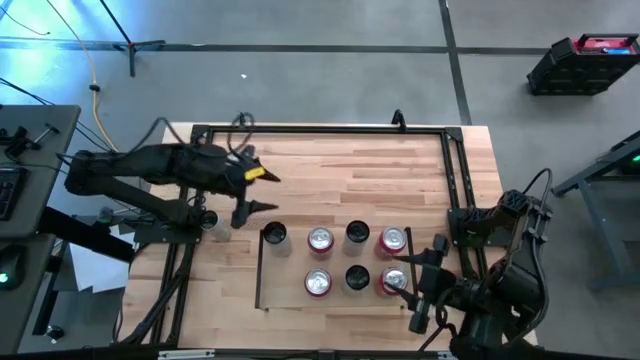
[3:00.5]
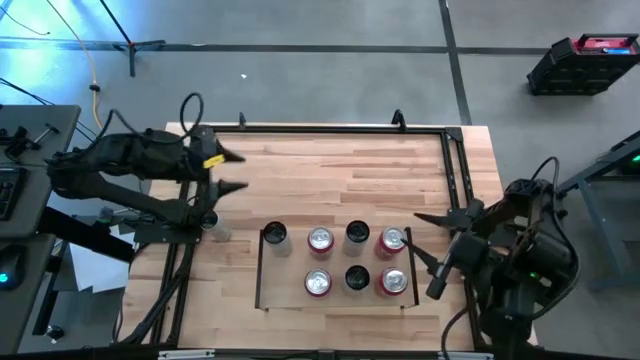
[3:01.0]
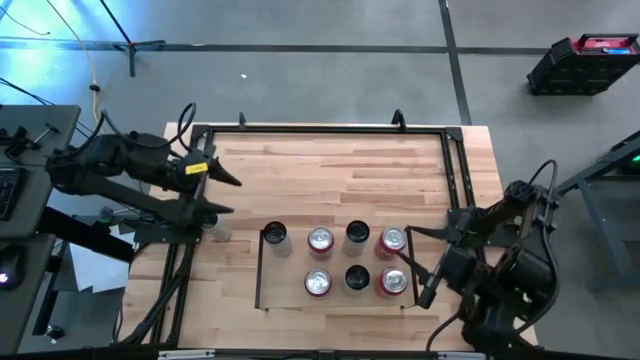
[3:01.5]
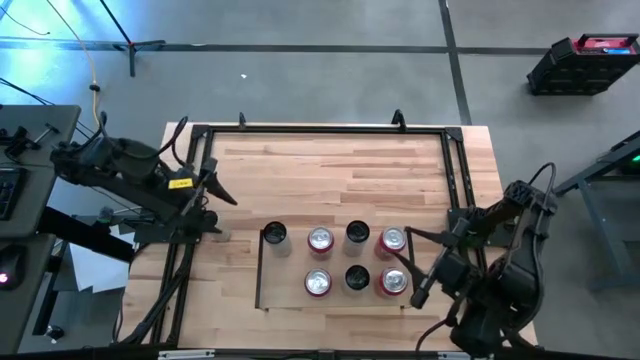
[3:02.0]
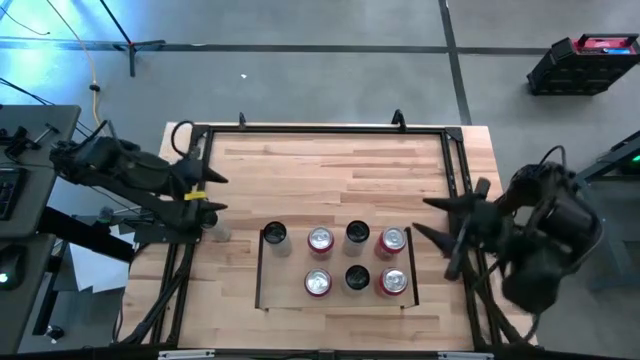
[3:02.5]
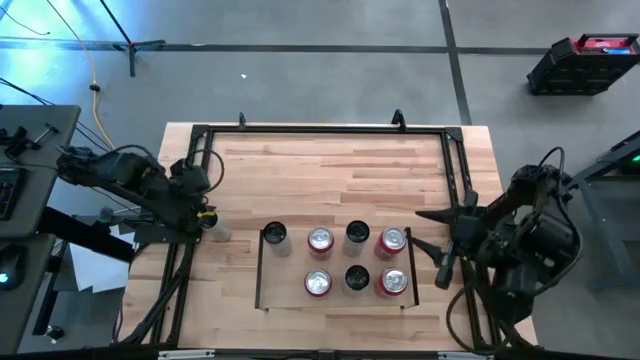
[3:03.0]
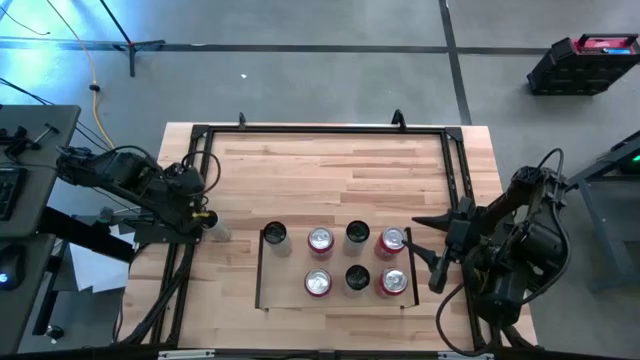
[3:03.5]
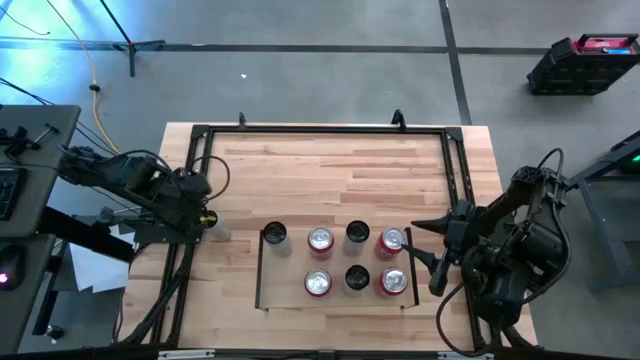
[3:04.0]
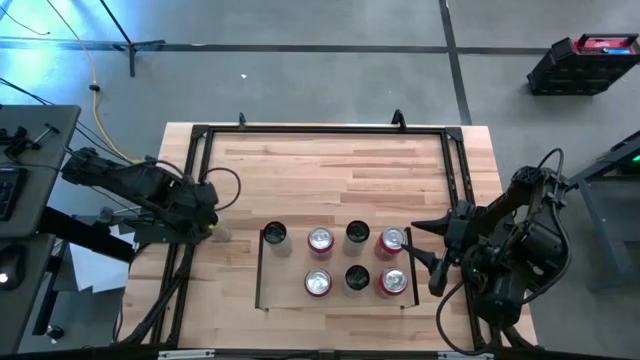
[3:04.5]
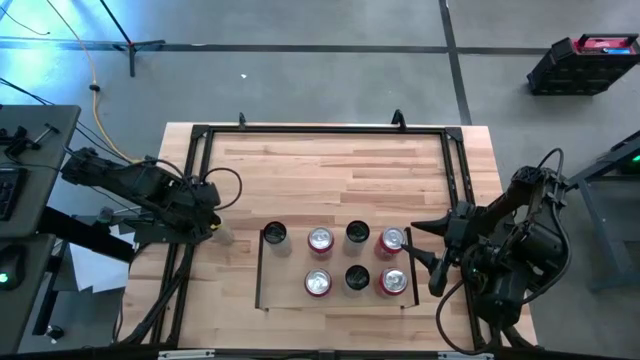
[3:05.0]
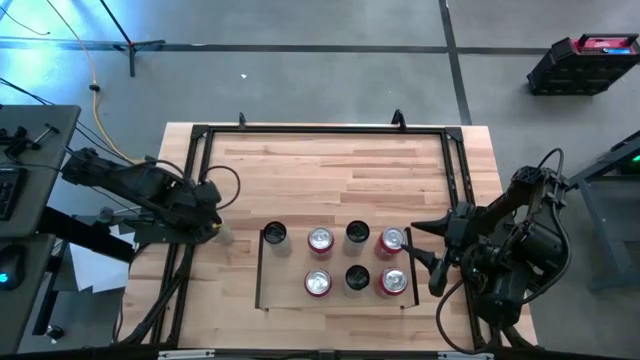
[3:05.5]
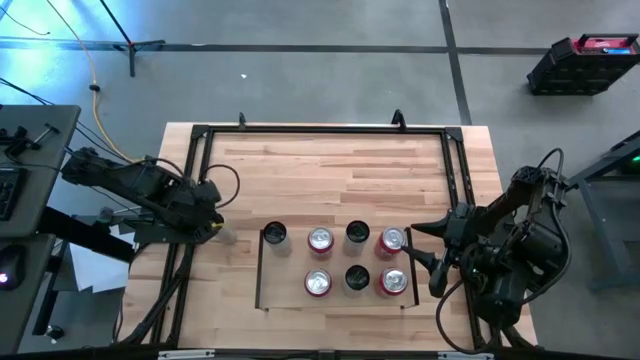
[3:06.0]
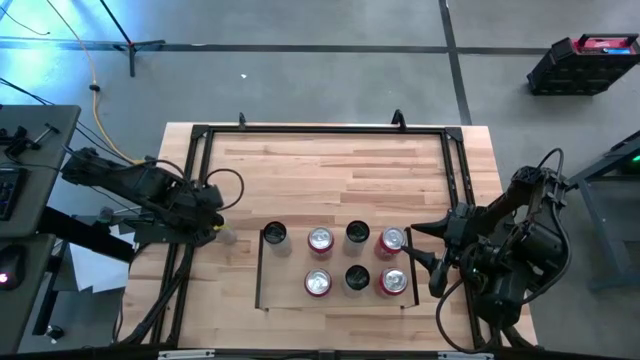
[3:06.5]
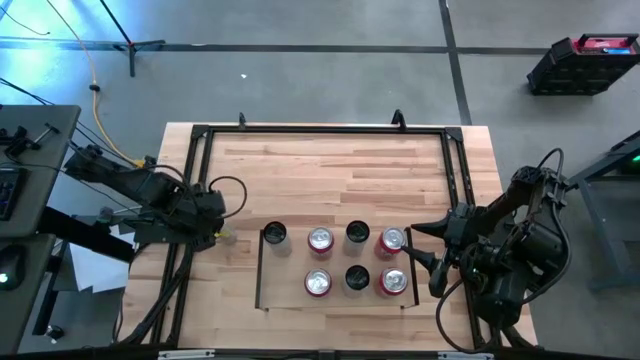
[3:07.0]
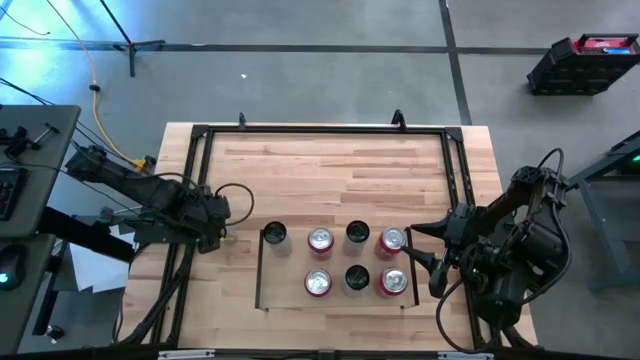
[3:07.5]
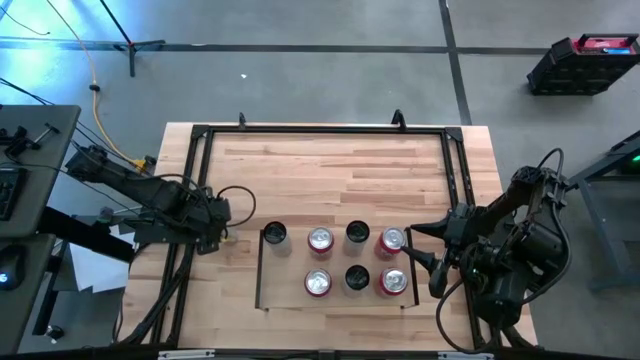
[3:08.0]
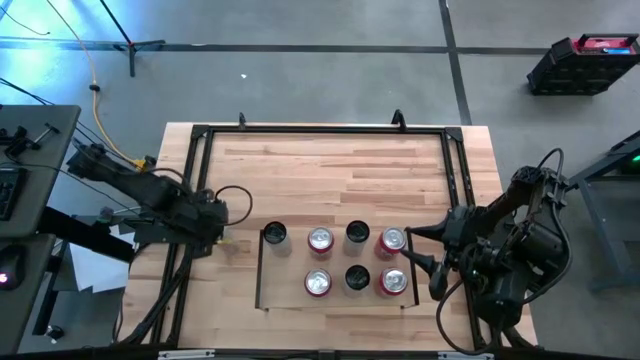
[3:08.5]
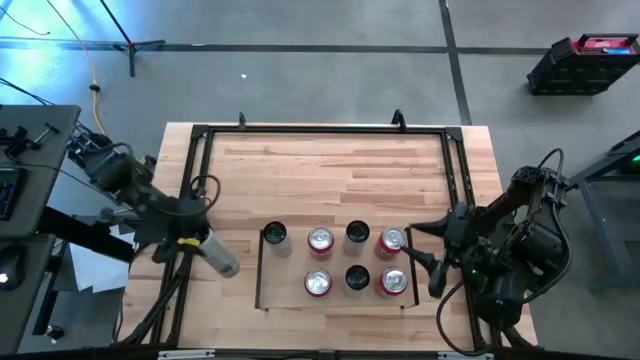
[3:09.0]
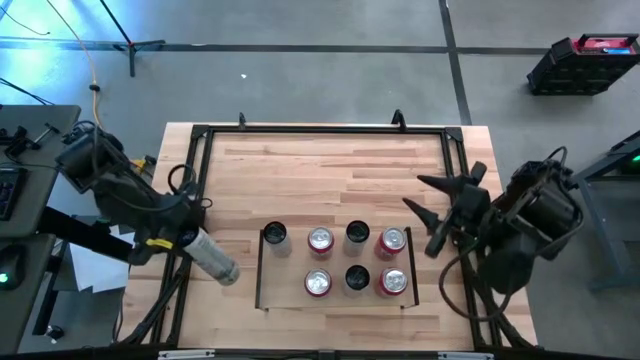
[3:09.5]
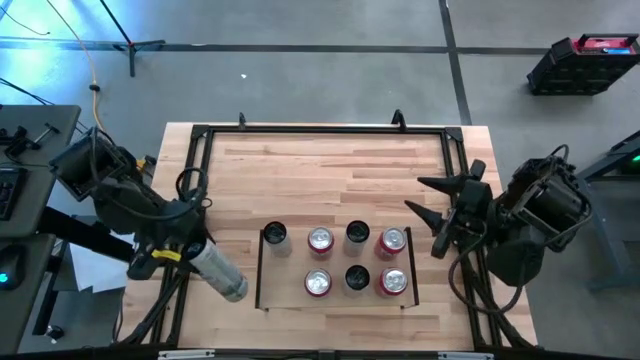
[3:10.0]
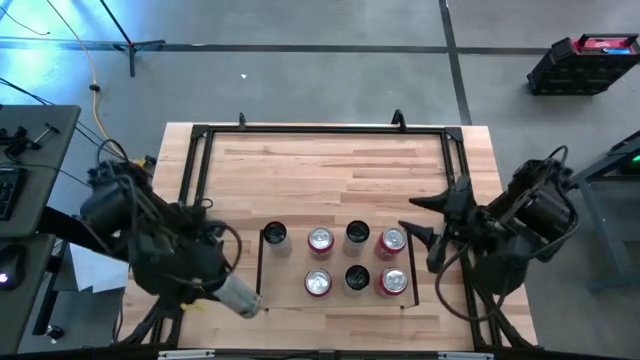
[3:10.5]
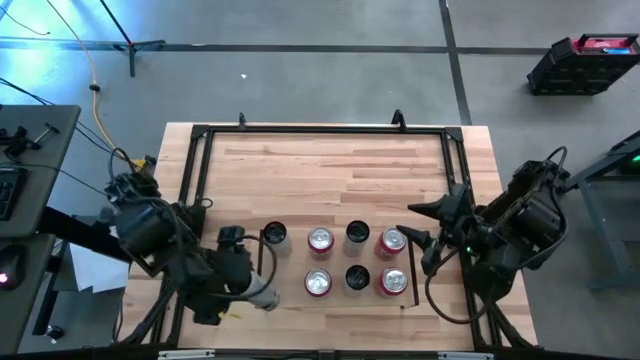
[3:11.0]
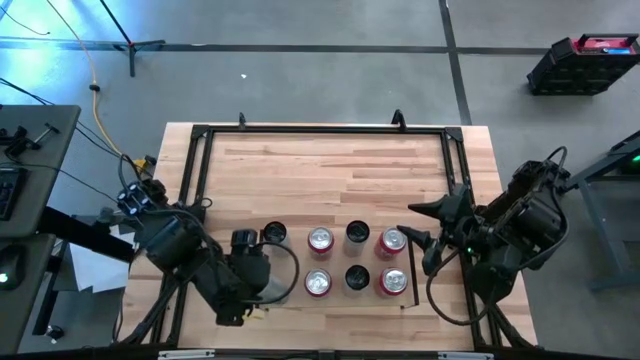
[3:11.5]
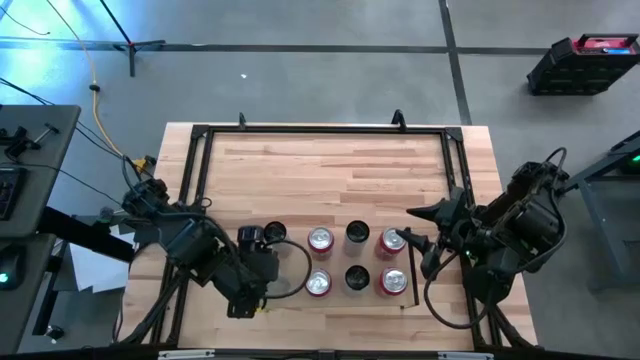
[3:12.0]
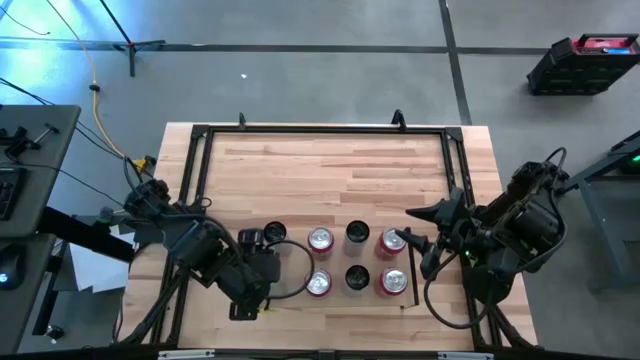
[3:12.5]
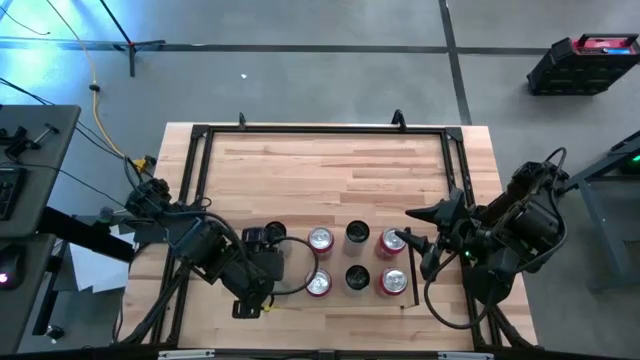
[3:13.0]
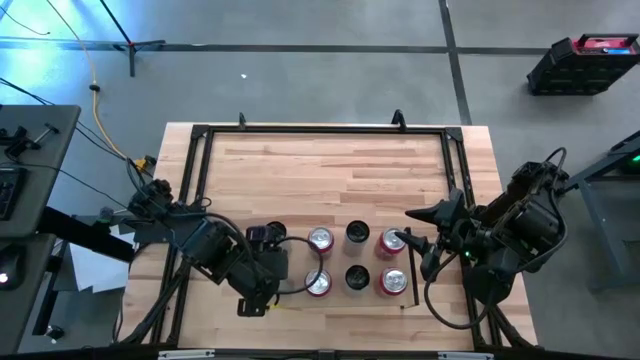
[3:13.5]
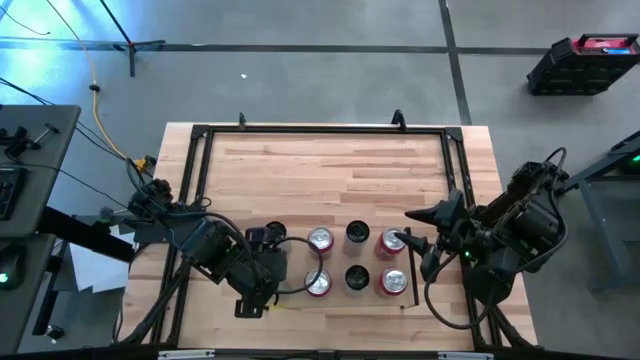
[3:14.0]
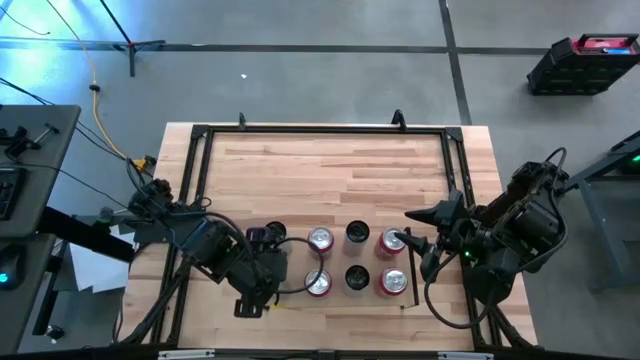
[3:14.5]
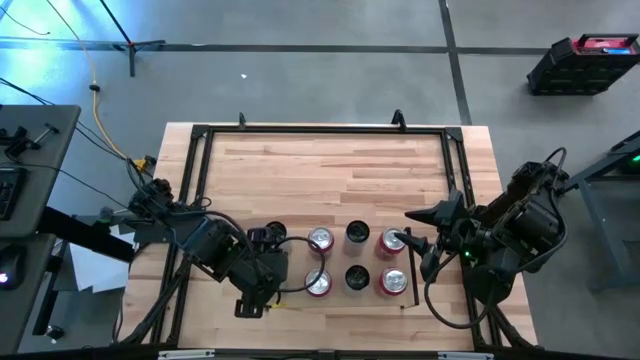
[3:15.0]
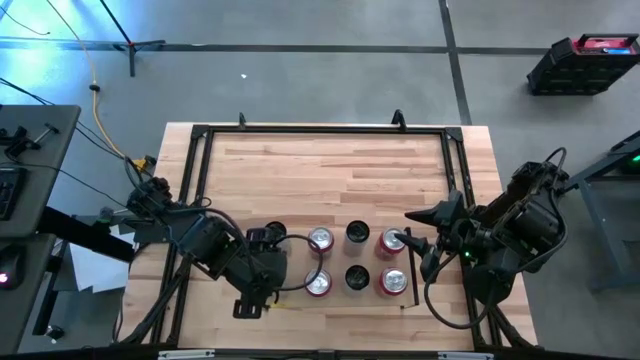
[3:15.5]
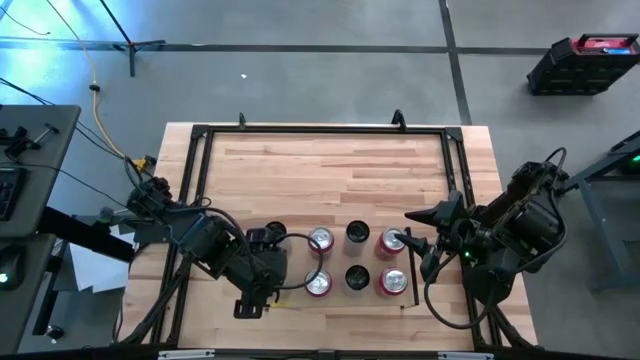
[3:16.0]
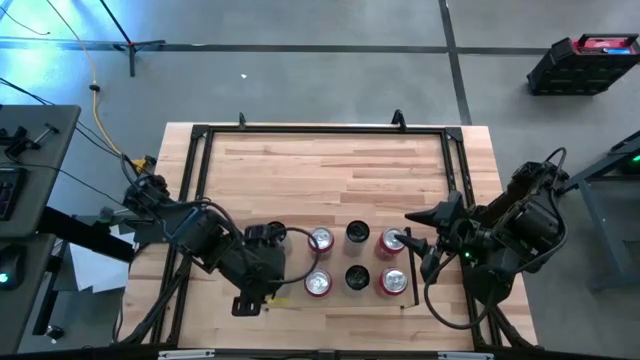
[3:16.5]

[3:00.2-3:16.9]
Task: Place canned beverage on shelf
Put the white yellow soda can on the shelf aligned with the white yellow soda can
